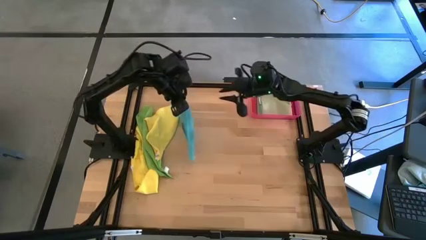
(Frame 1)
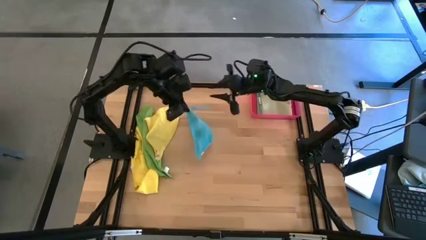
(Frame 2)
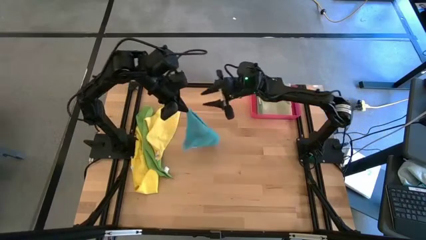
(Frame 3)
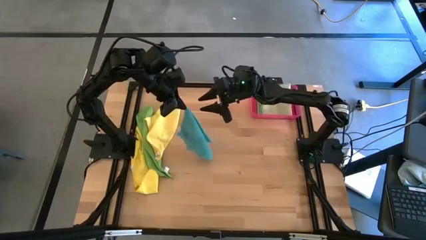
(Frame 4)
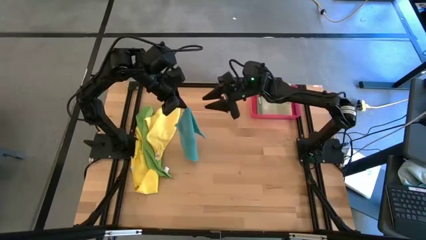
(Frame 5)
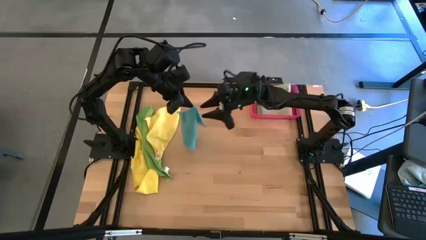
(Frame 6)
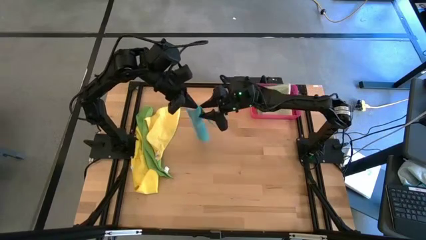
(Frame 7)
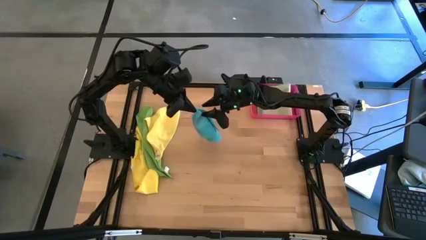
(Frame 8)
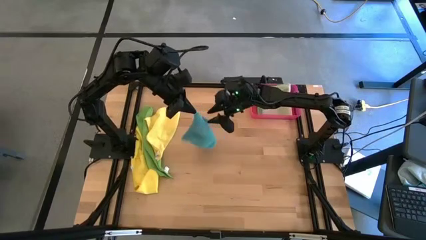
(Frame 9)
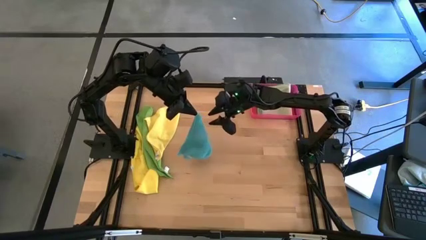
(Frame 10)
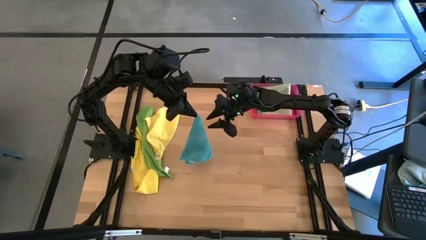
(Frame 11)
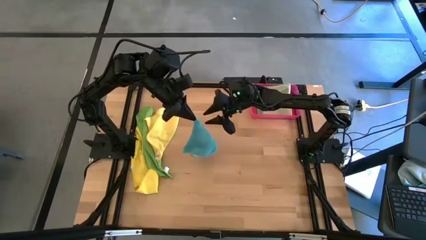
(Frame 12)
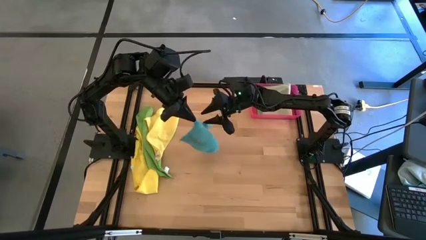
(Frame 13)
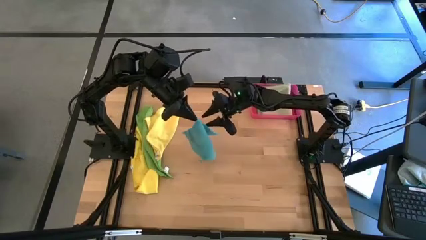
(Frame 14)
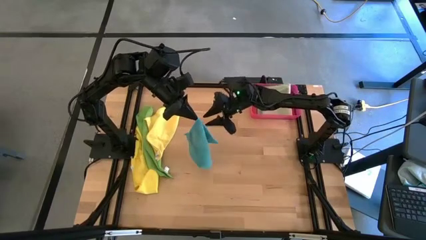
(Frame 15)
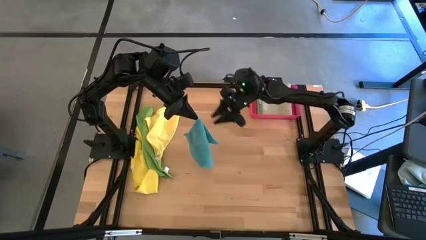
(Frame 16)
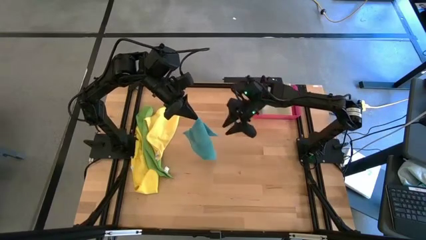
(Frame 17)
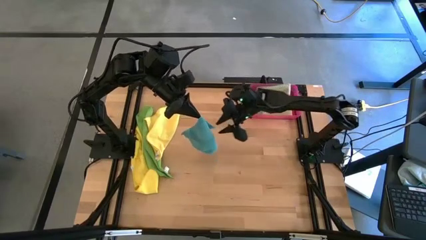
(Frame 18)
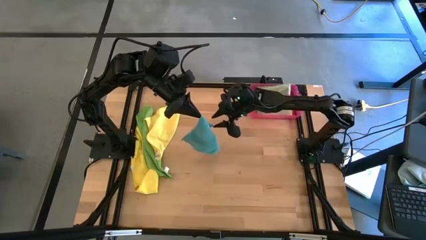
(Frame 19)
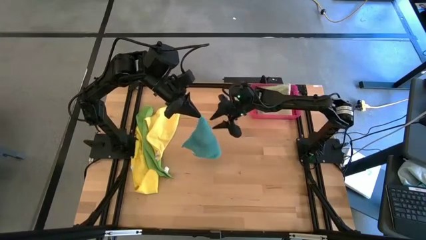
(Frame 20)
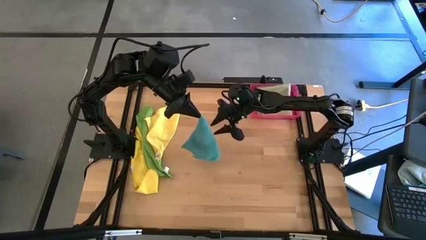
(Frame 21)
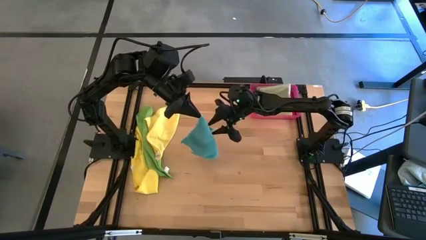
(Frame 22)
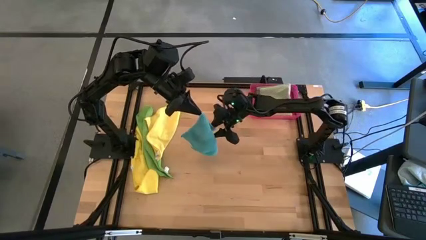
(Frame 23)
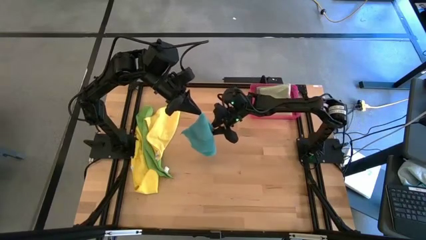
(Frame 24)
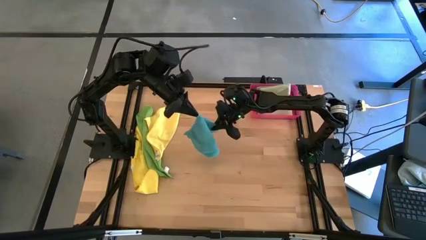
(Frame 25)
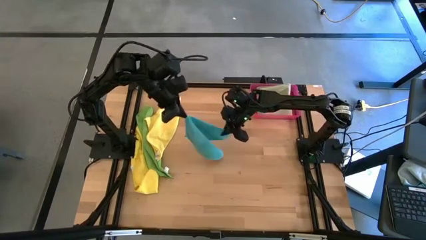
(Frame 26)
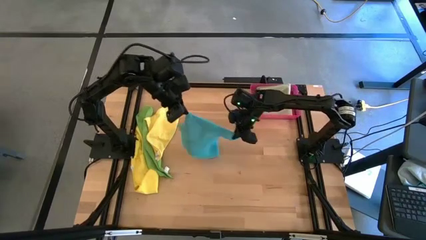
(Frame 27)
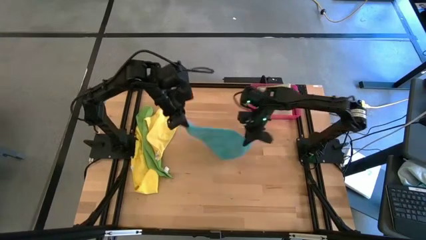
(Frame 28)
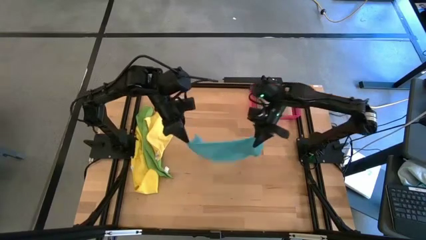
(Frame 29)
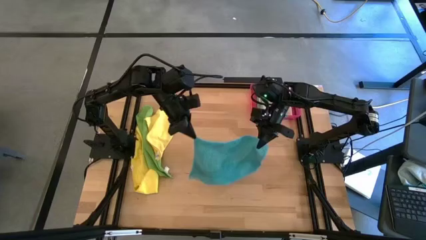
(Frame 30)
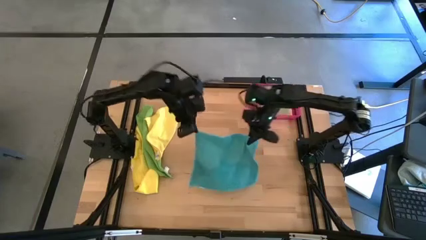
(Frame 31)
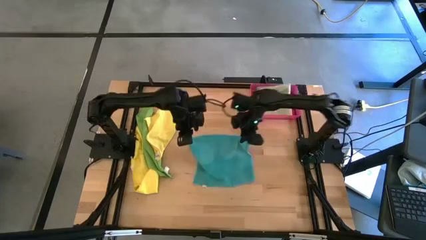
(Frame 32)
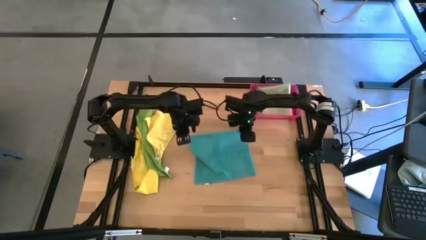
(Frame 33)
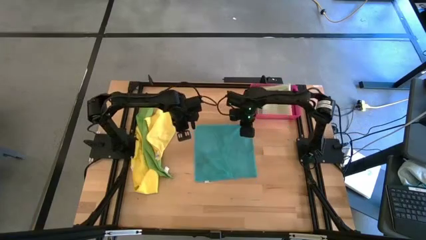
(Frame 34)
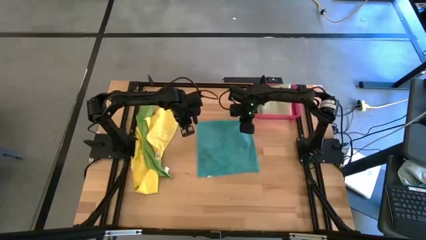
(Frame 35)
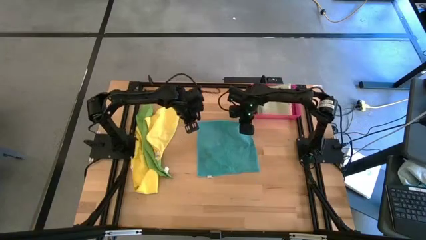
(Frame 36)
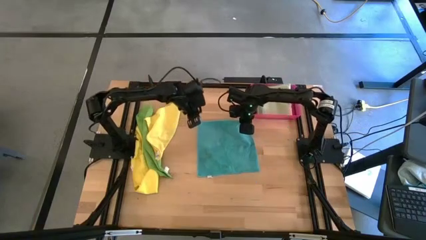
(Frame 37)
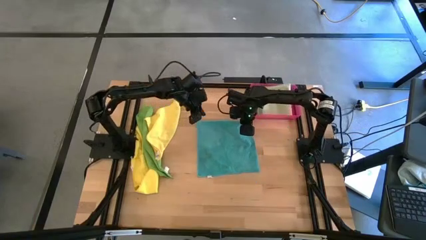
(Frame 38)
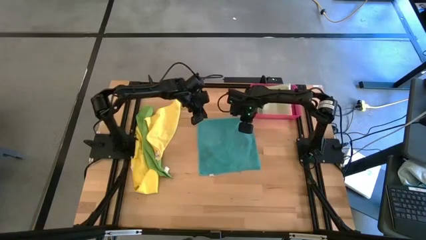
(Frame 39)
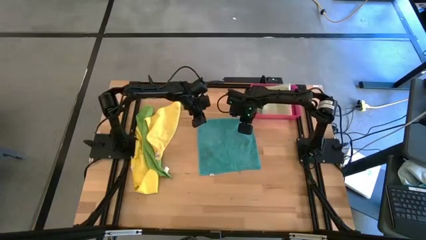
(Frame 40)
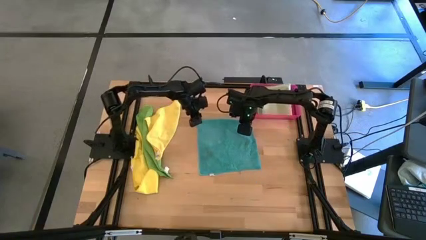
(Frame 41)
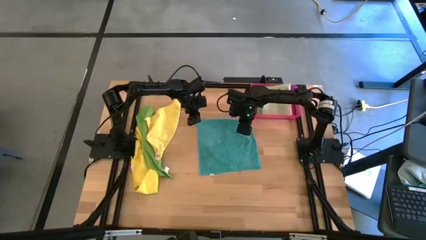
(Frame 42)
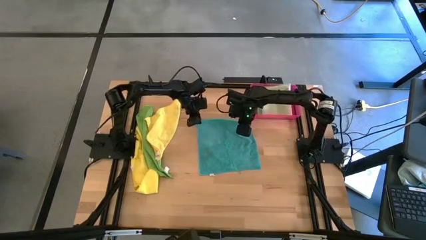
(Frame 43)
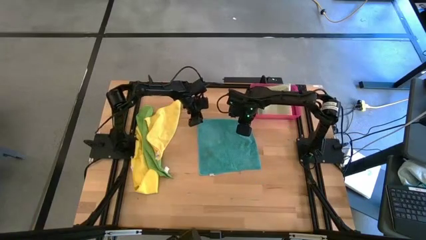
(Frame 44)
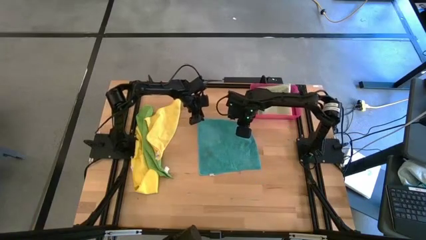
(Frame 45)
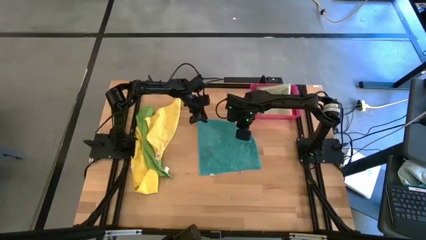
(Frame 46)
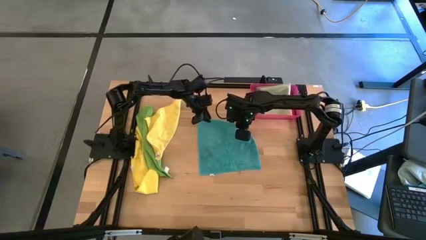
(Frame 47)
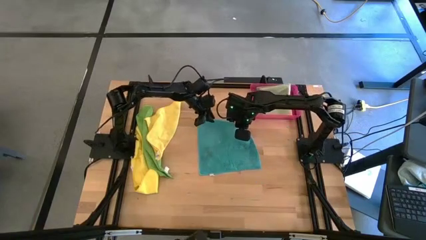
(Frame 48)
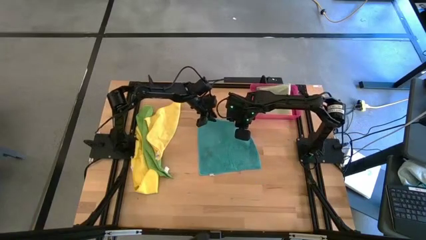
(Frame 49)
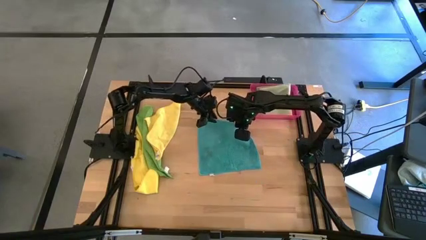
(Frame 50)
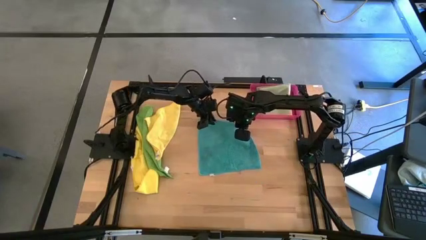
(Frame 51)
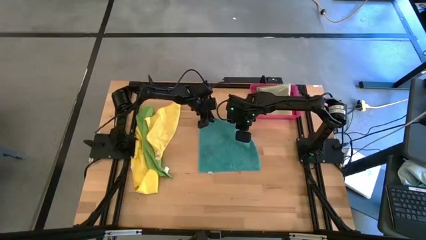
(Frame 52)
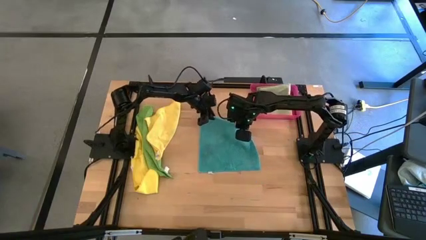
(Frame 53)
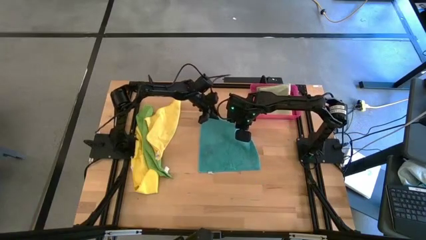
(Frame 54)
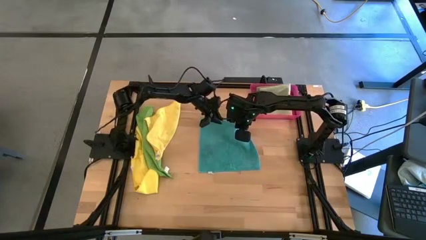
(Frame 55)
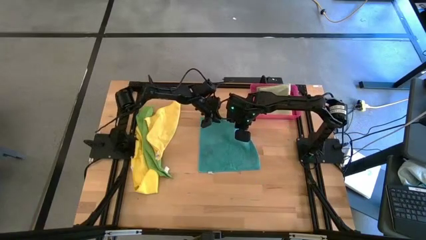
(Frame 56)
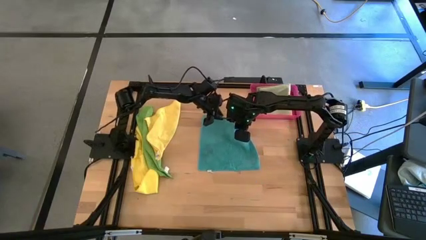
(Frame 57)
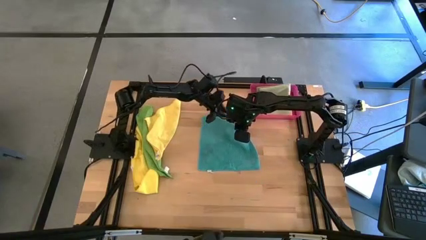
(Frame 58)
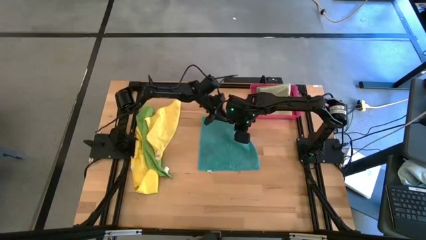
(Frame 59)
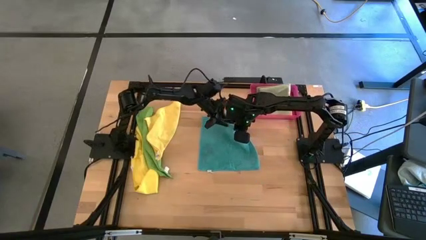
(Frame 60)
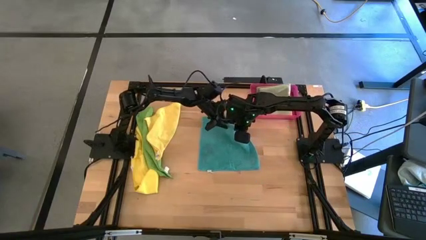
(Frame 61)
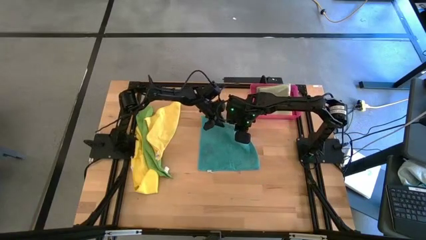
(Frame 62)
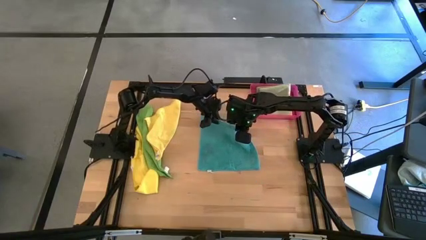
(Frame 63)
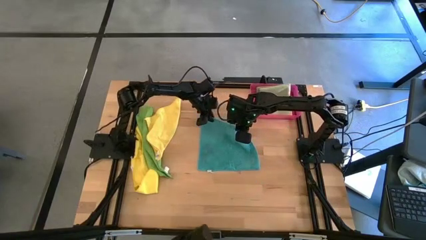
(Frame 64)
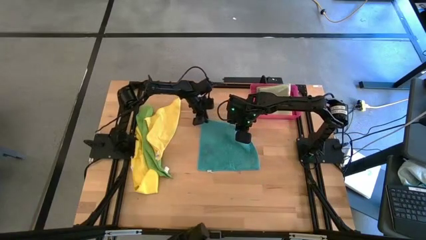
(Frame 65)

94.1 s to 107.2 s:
Task: Fold microfiber towels
Fold the blue towel

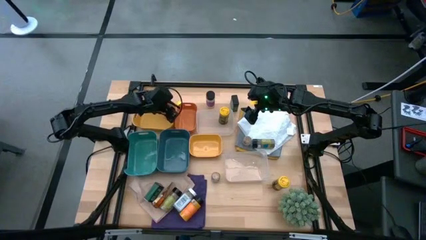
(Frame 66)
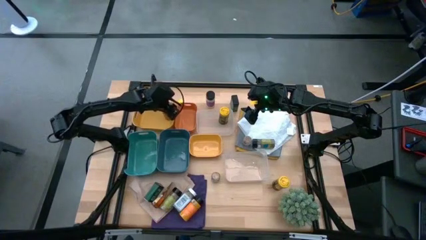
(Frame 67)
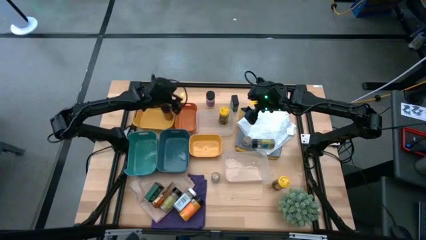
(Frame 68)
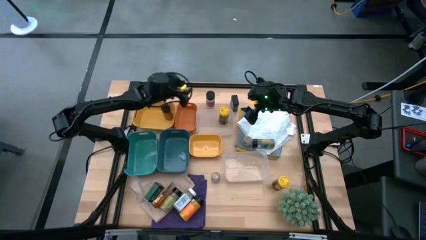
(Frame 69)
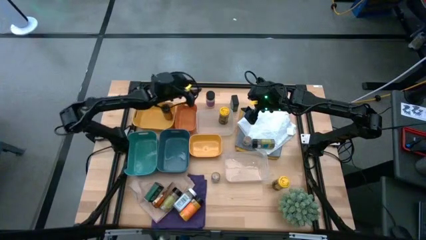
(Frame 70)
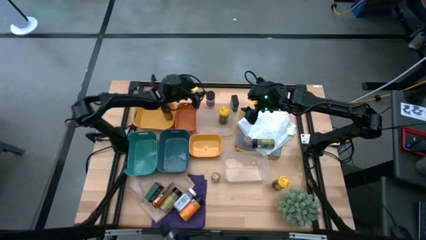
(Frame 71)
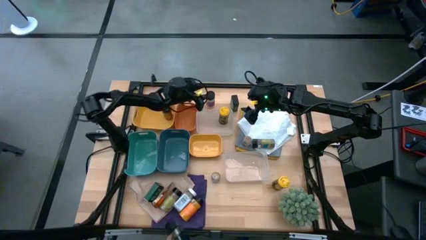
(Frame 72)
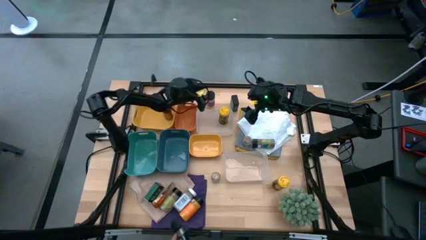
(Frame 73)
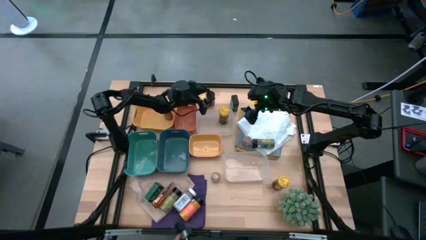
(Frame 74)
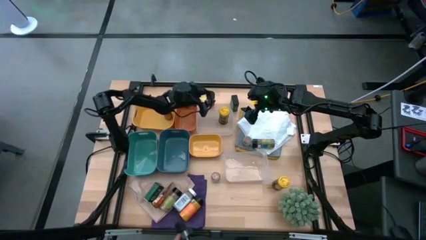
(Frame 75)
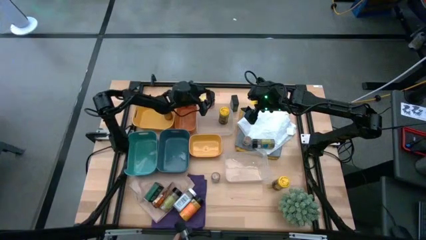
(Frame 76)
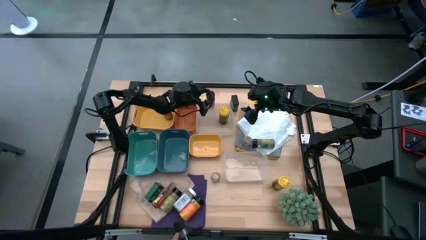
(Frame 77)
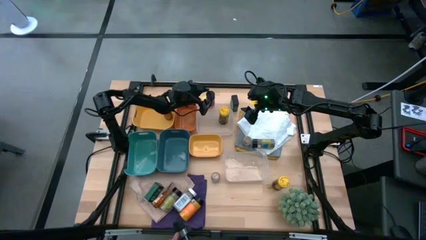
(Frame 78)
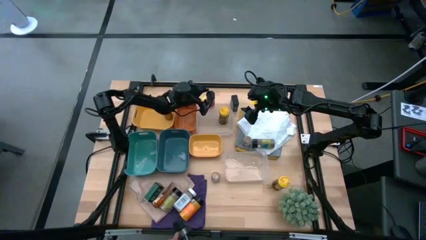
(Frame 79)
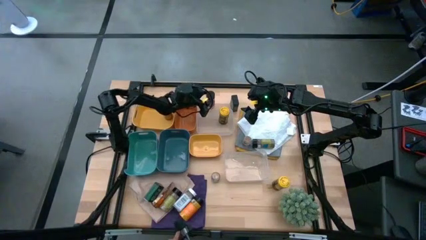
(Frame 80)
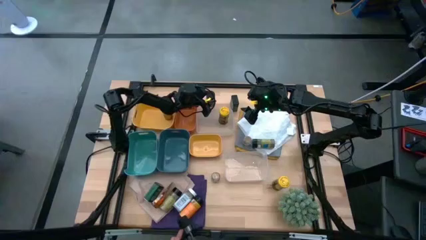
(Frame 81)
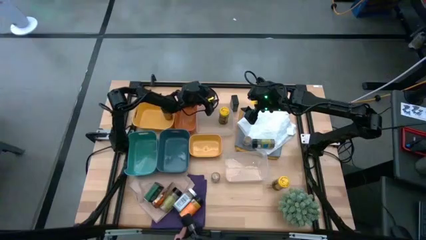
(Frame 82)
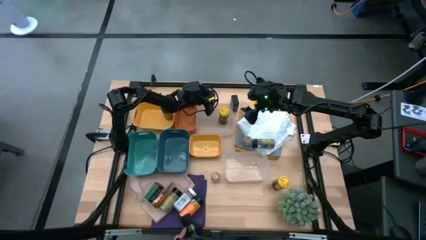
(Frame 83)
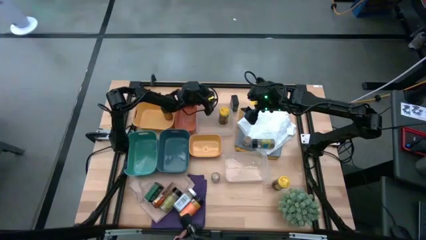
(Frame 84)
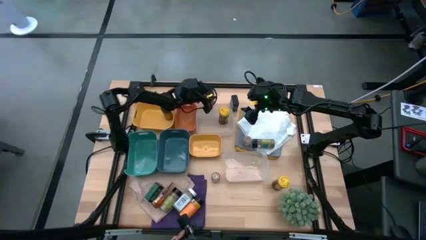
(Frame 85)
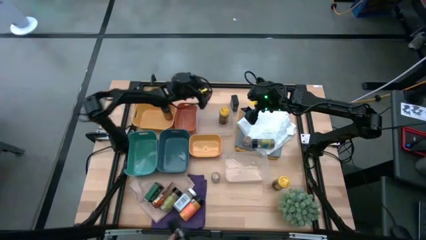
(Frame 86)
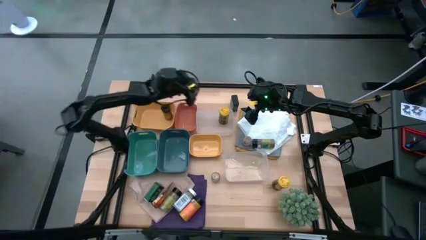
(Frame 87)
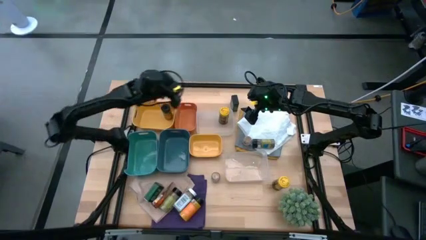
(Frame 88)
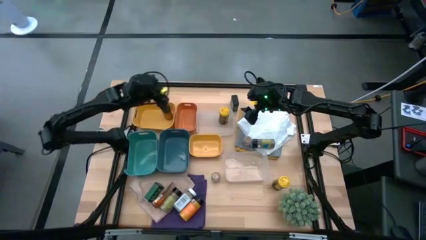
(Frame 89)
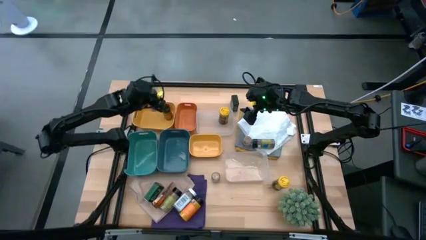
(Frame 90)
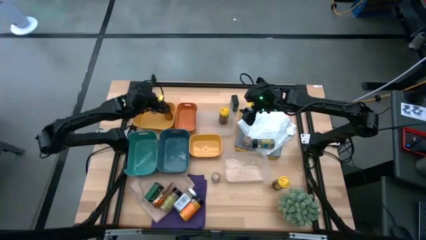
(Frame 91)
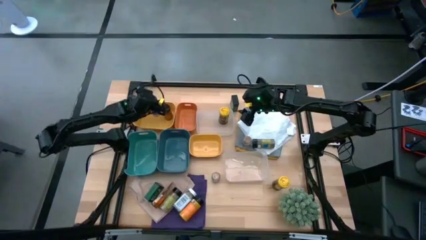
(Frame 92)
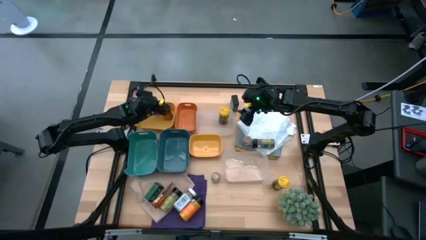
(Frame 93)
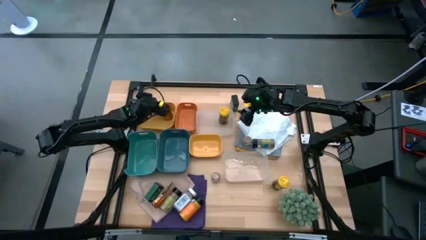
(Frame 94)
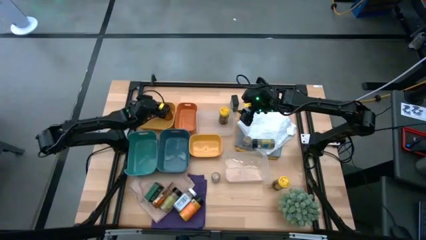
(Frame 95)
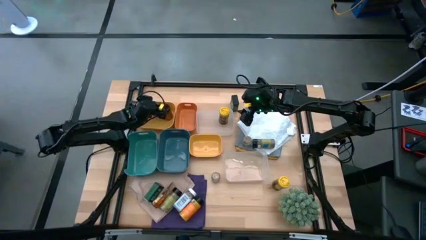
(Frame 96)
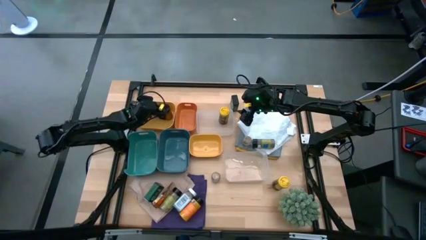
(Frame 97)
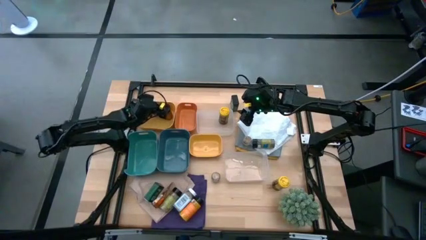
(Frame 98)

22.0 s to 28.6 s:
Task: Sort spices by type
Put the purple spice bottle into the top yellow bin
